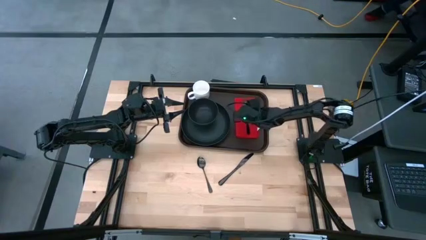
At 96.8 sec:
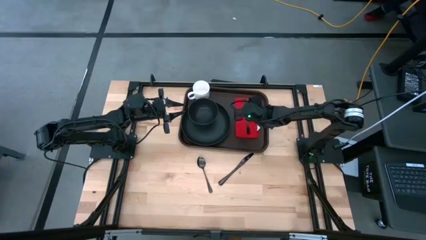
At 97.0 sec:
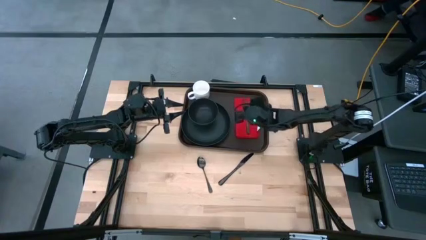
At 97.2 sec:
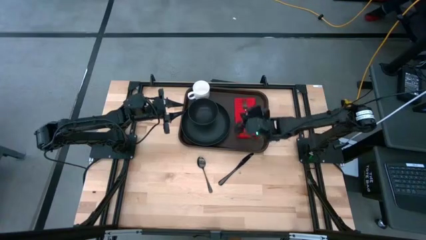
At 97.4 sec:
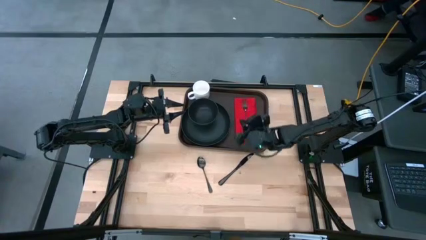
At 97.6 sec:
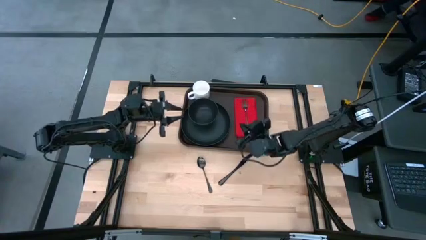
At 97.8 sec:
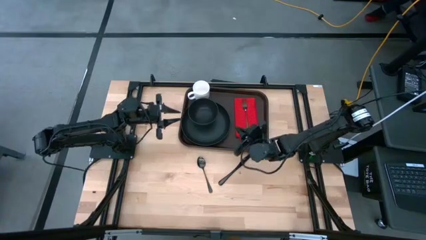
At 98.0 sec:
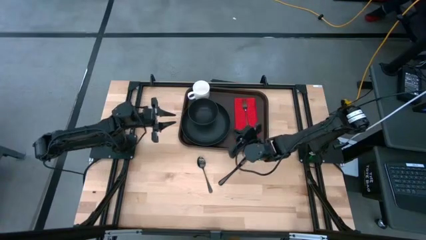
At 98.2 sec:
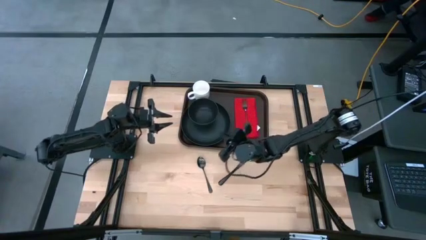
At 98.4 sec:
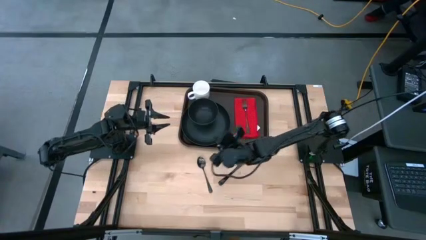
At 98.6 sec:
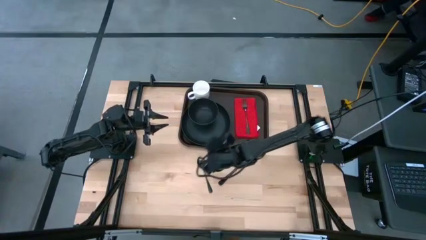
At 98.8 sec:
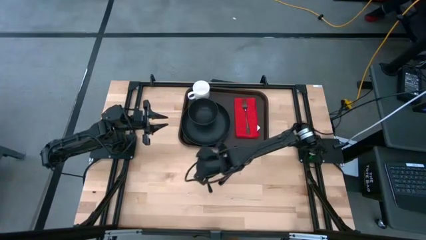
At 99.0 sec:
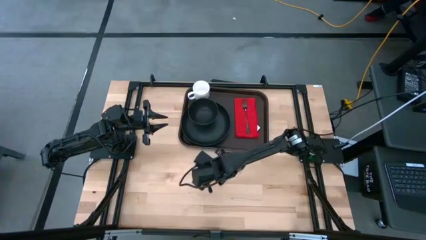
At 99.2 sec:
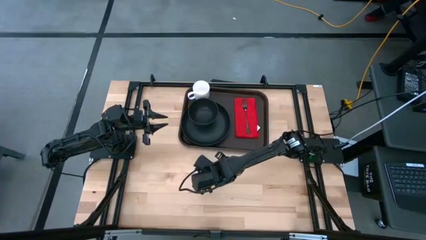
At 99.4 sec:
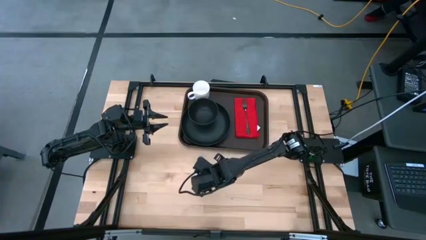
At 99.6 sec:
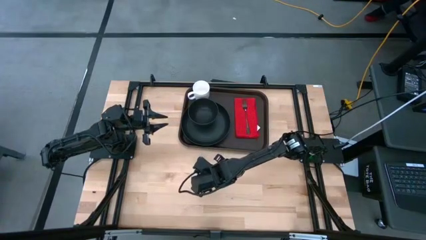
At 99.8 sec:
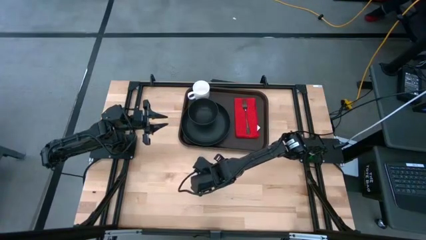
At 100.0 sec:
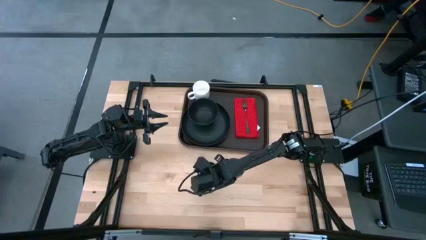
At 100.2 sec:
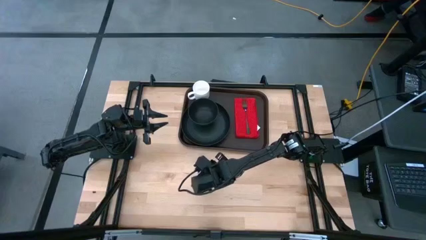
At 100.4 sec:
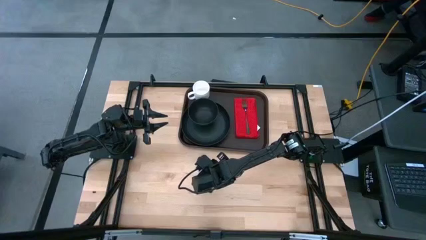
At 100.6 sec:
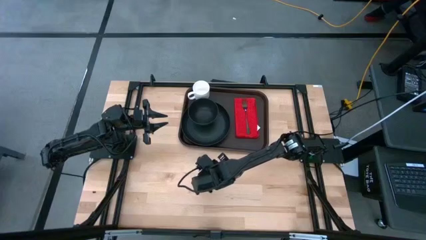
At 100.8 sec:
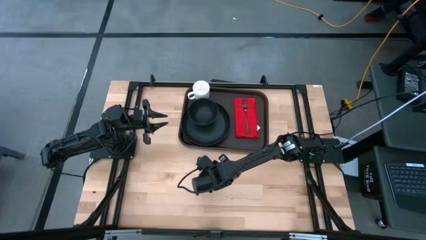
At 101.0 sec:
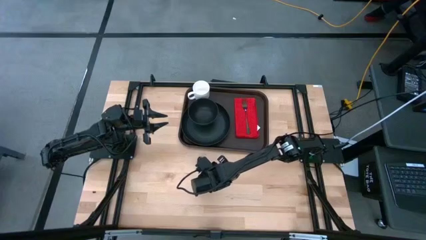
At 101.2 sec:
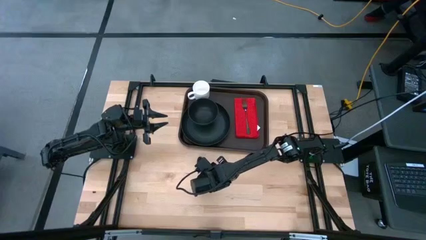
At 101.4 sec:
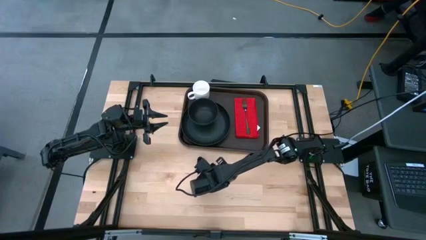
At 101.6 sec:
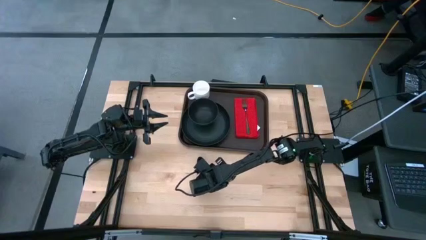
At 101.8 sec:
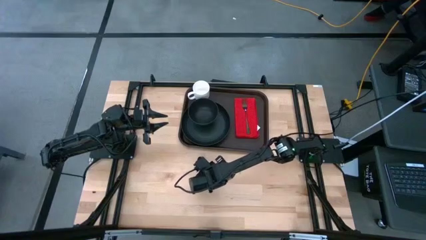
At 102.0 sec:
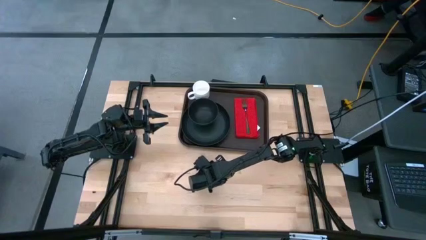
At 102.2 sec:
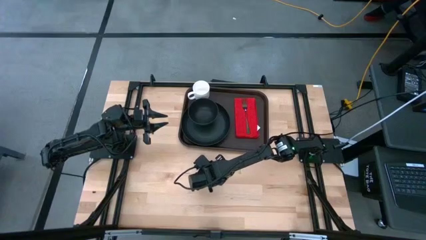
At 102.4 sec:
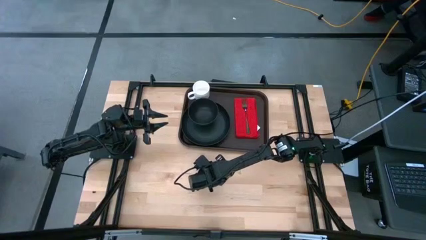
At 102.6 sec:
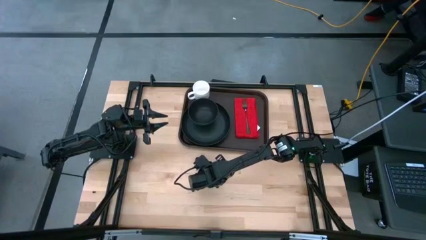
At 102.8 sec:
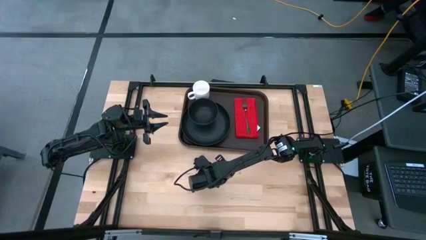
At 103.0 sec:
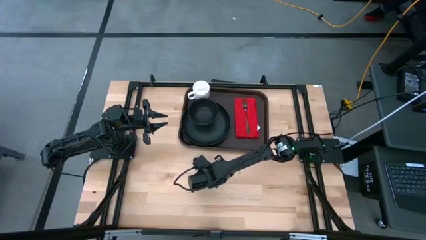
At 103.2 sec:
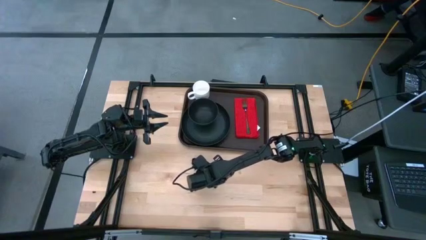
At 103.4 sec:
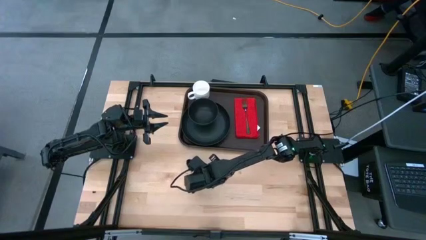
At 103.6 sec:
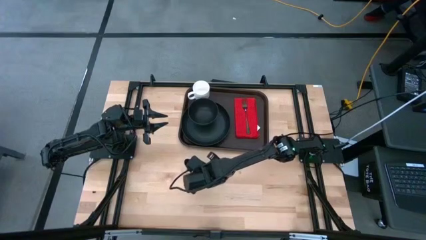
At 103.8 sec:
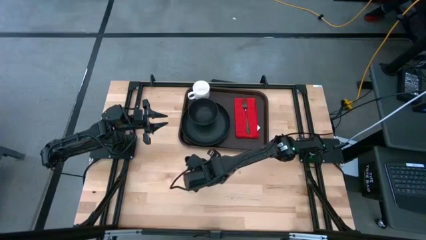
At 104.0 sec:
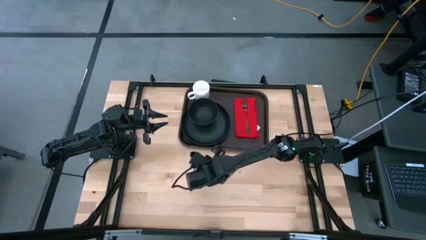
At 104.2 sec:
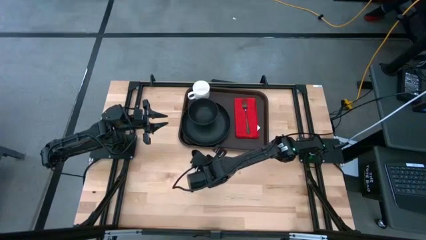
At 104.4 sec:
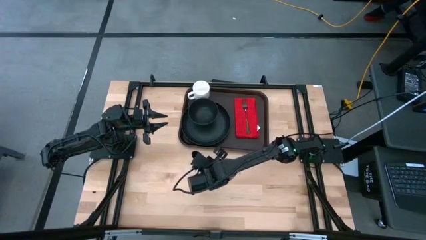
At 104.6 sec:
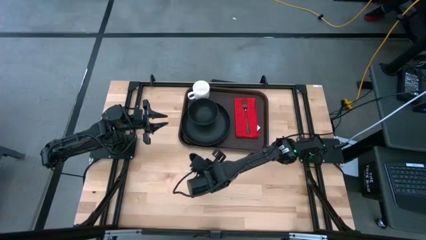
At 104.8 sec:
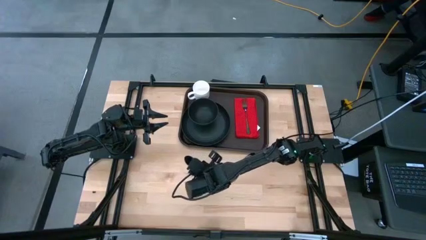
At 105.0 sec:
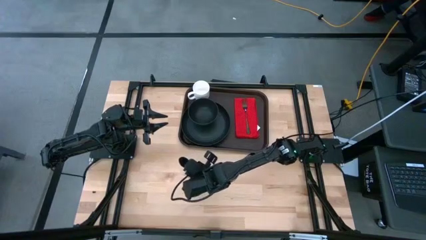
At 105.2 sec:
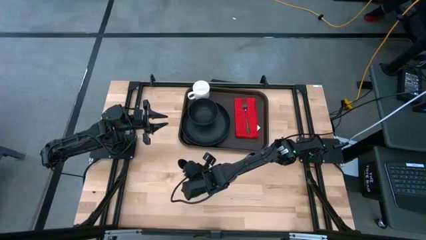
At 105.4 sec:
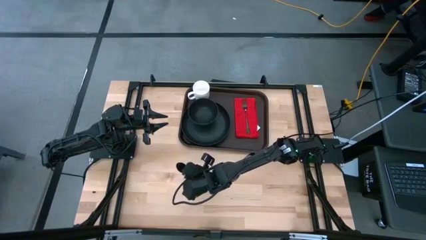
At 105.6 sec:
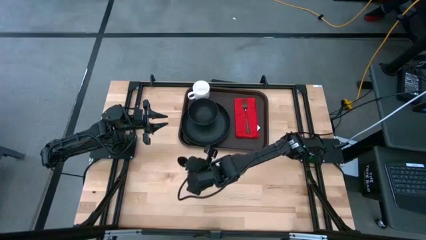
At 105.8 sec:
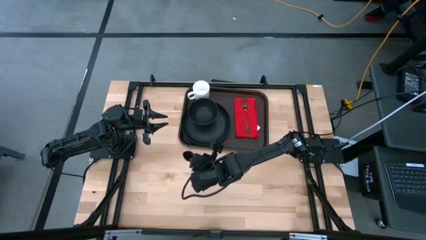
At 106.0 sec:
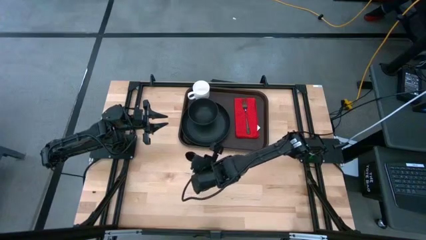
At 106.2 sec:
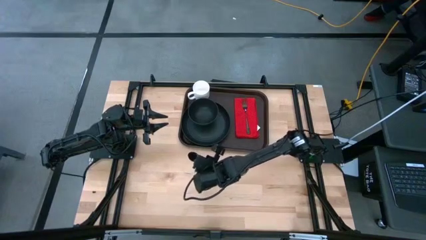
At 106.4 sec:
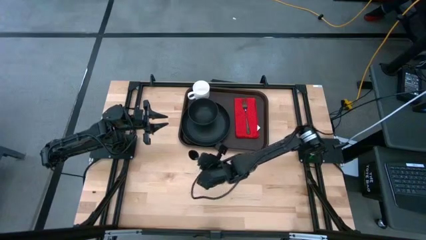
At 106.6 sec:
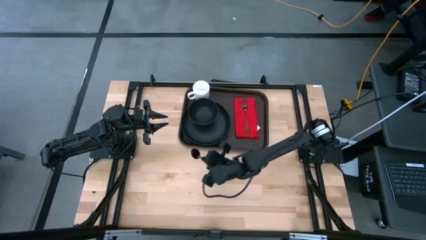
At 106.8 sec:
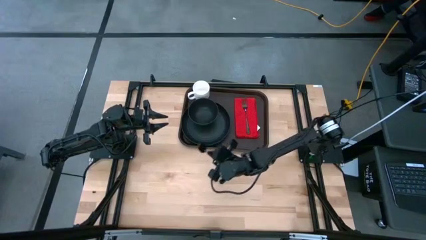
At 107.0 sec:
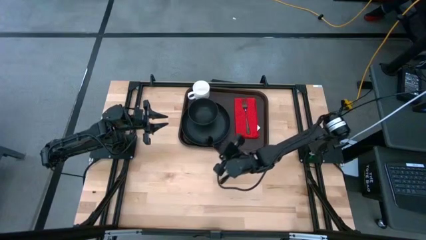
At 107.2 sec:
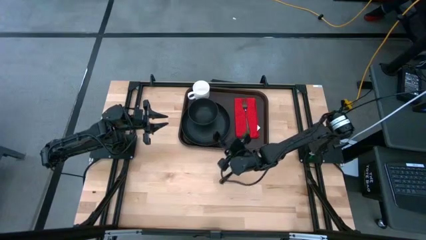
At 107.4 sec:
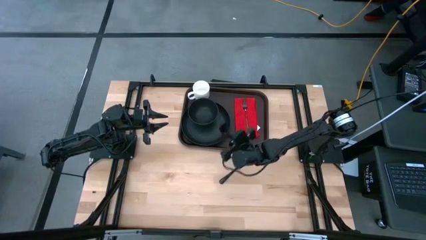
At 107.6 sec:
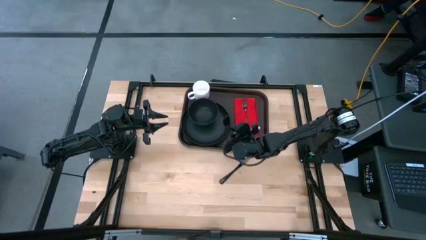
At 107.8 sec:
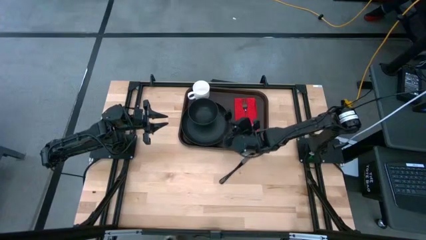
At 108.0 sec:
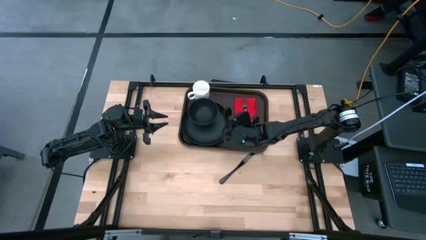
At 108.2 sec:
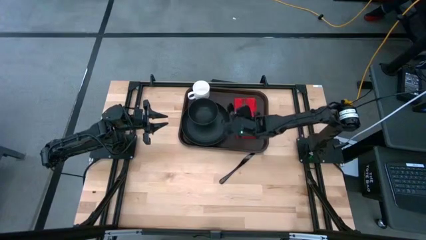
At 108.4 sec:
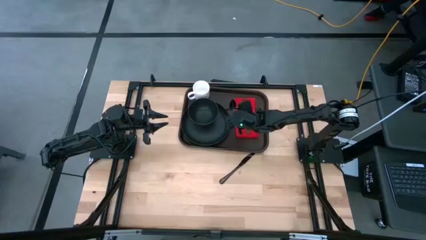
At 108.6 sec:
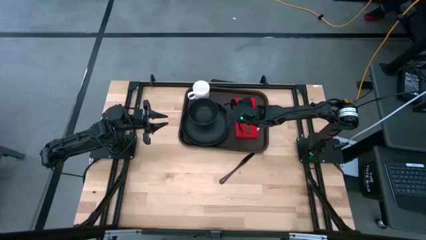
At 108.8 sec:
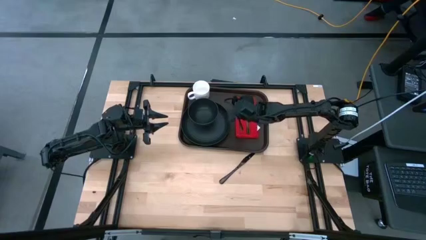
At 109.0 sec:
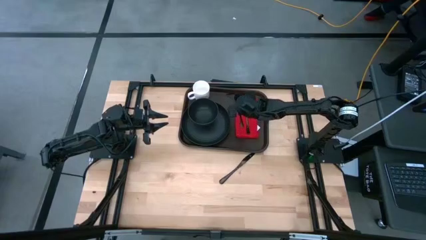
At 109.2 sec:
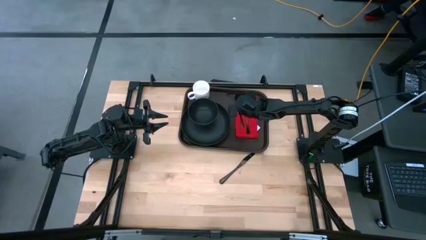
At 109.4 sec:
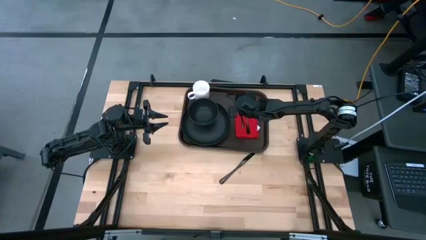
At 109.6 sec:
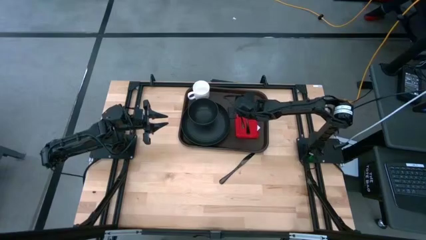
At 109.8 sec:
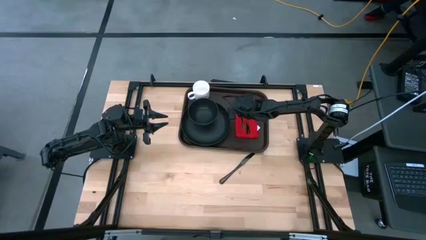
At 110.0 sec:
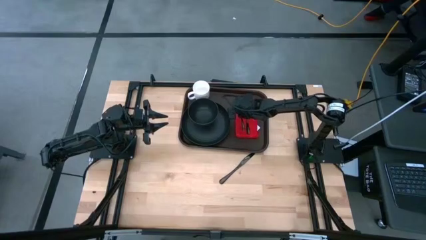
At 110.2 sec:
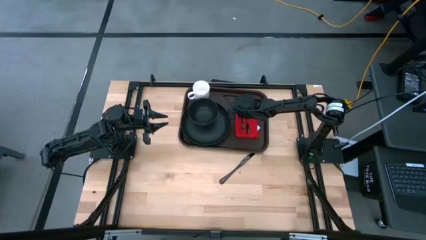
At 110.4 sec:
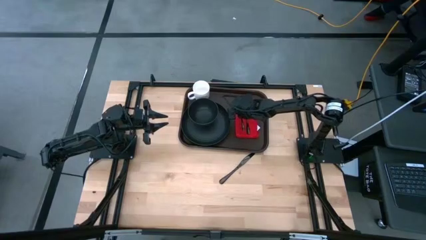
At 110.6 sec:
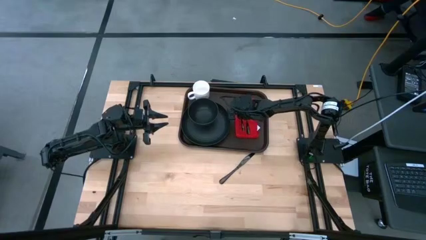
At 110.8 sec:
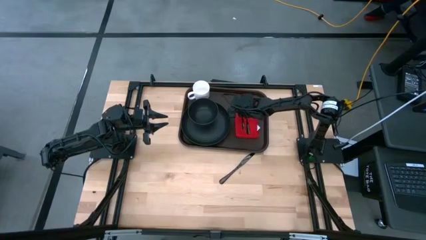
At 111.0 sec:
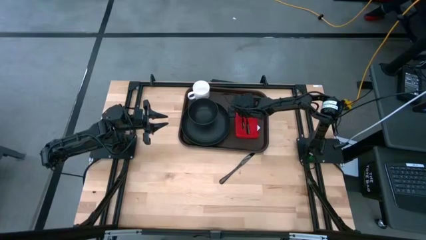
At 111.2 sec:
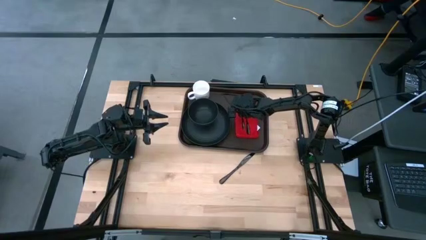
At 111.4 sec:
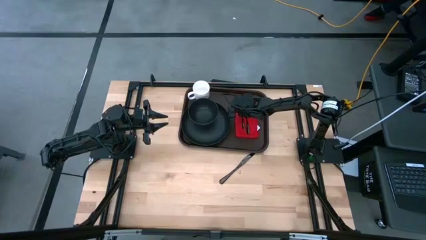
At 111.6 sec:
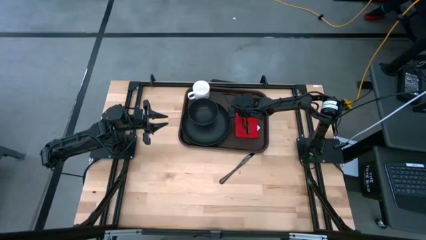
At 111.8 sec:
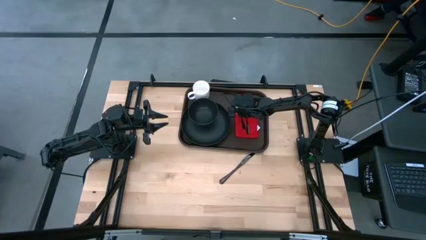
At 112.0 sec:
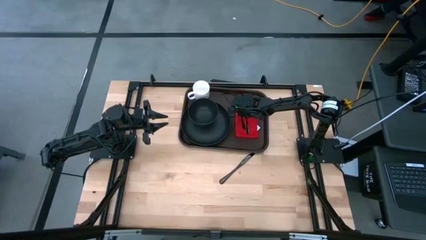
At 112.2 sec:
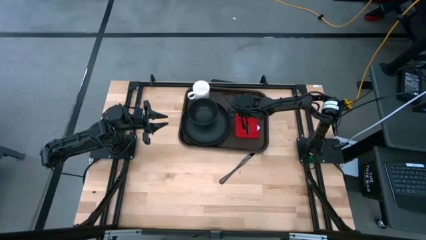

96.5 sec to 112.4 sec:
Task: Set up tray
Put the black spoon on the red napkin to the left of the black fork
